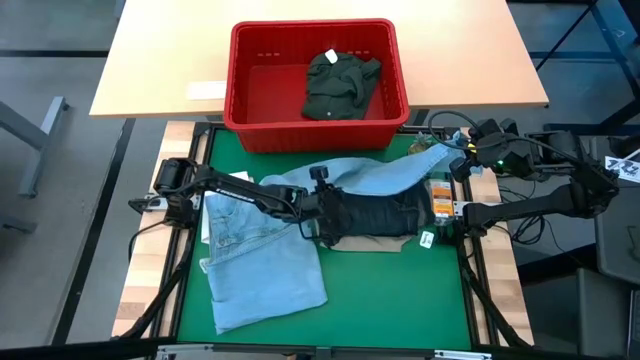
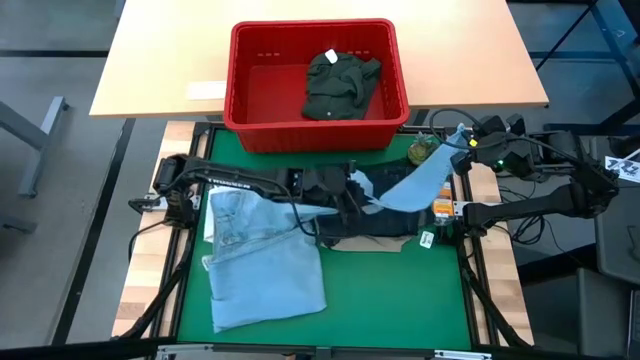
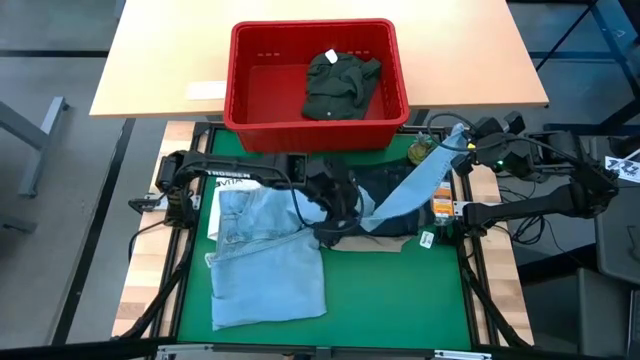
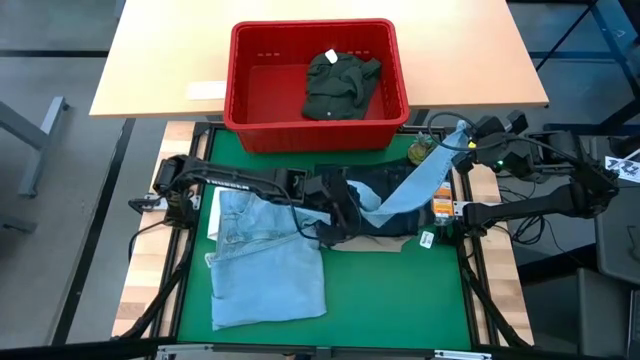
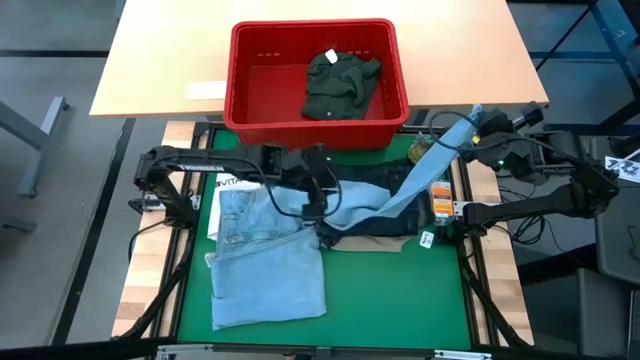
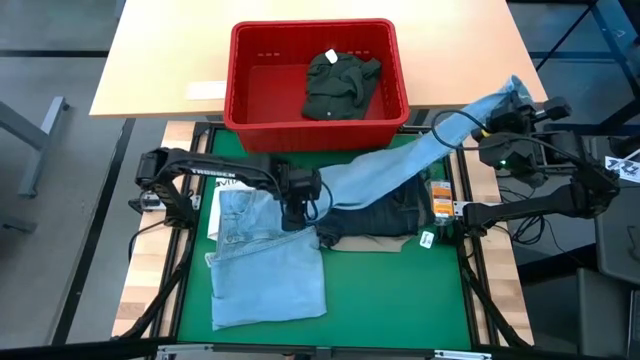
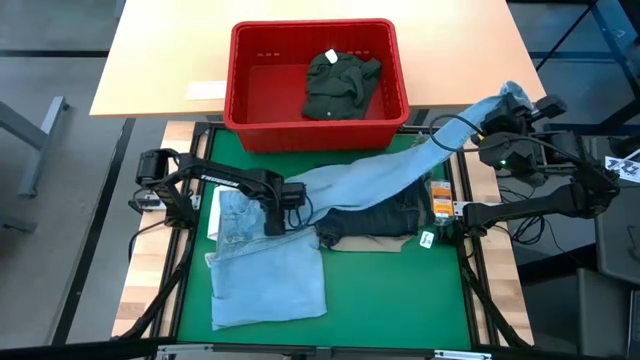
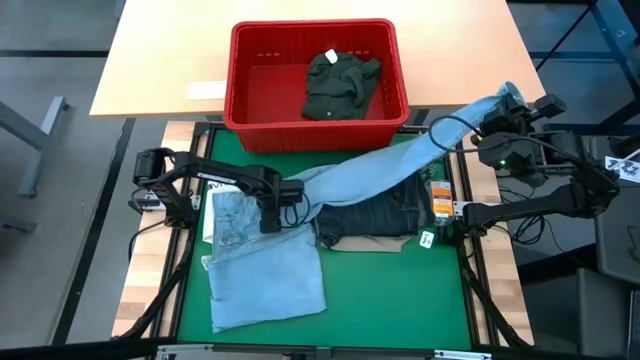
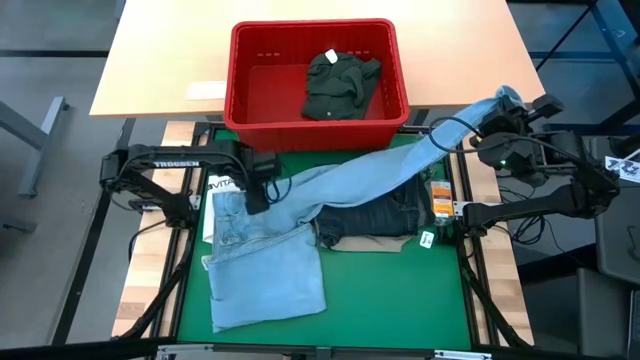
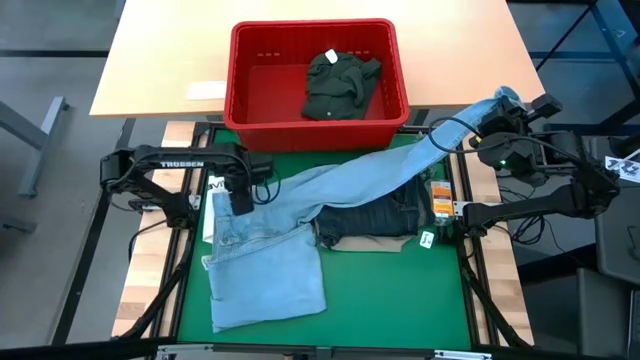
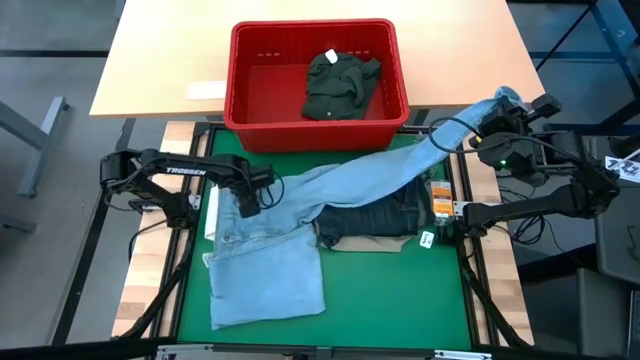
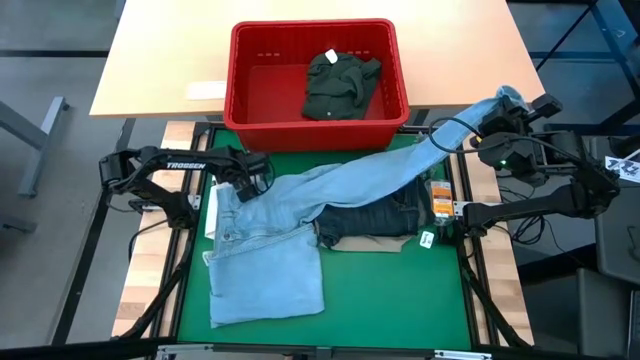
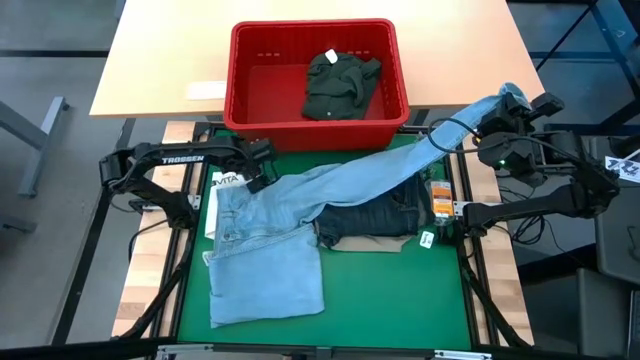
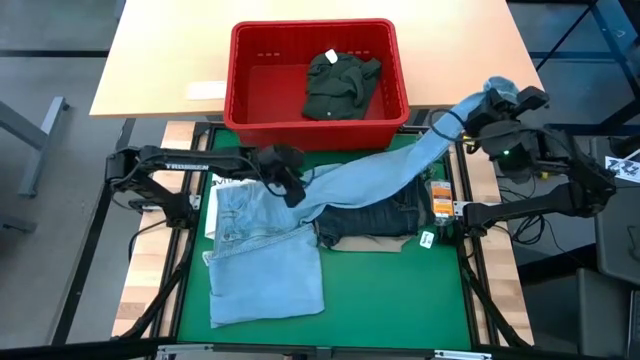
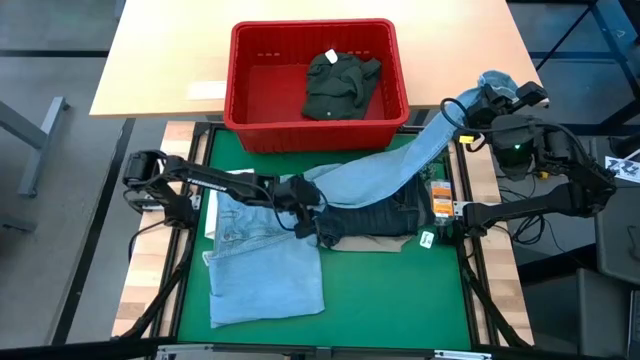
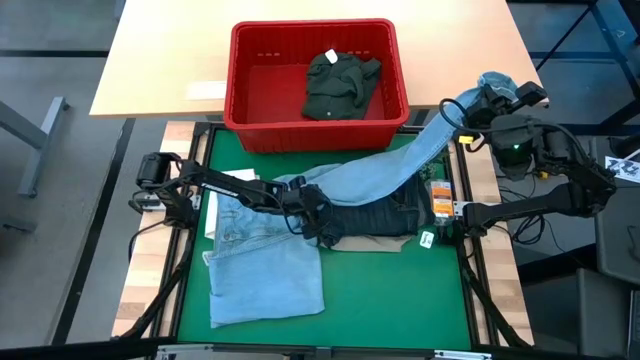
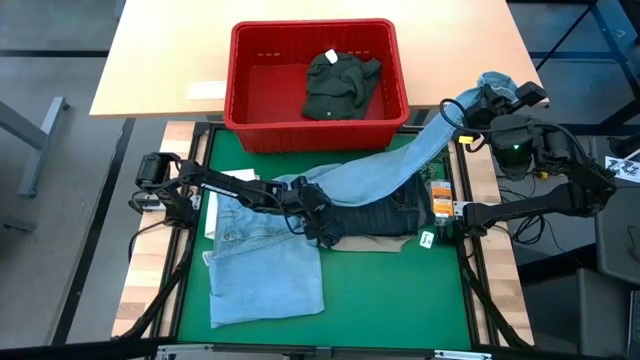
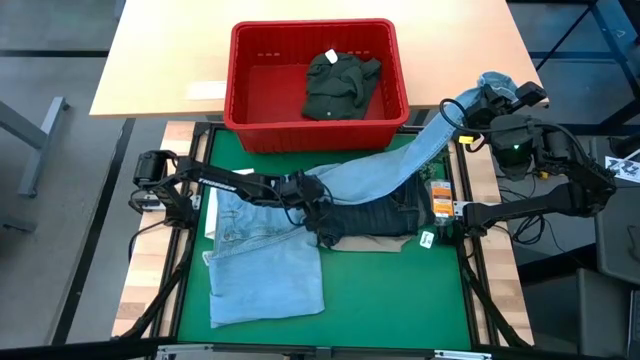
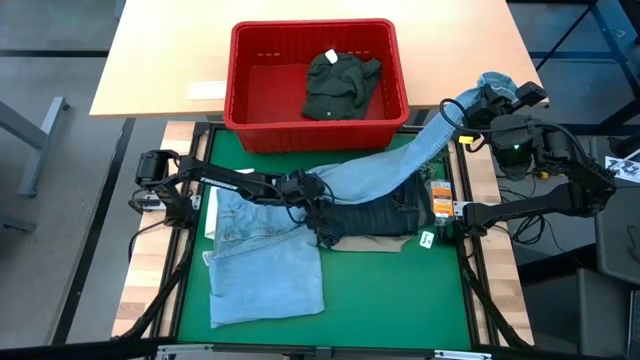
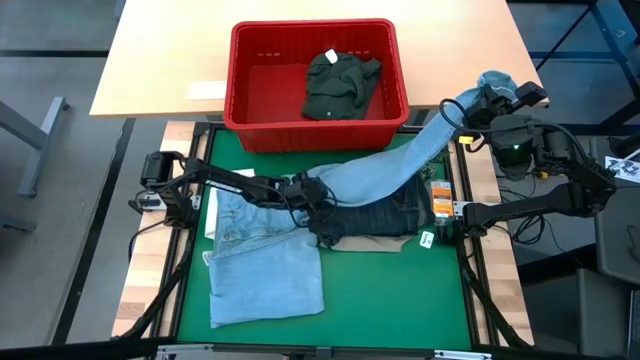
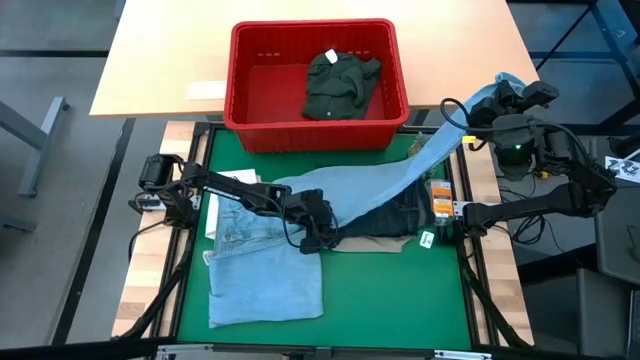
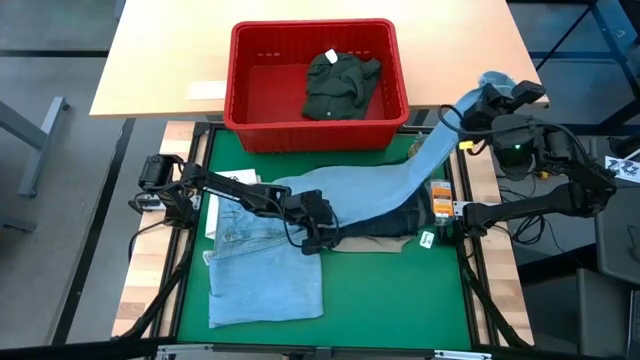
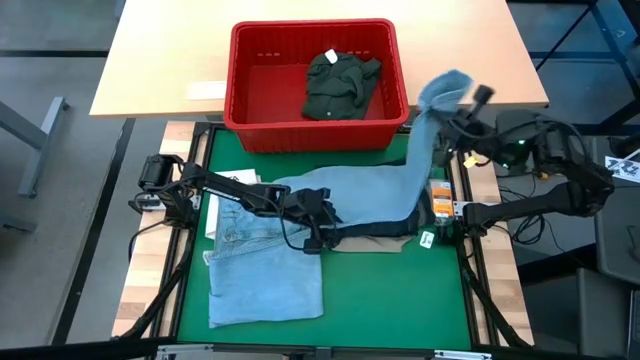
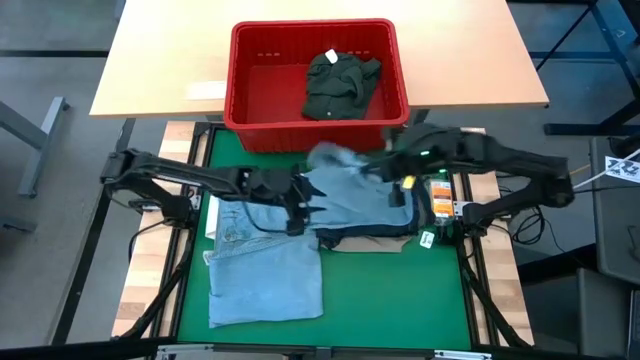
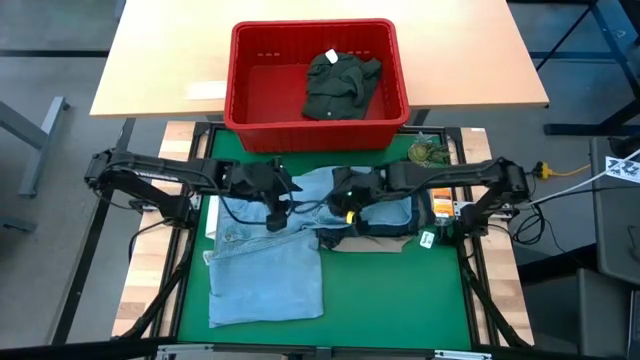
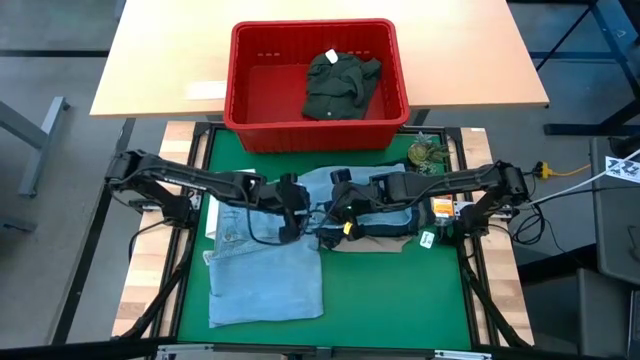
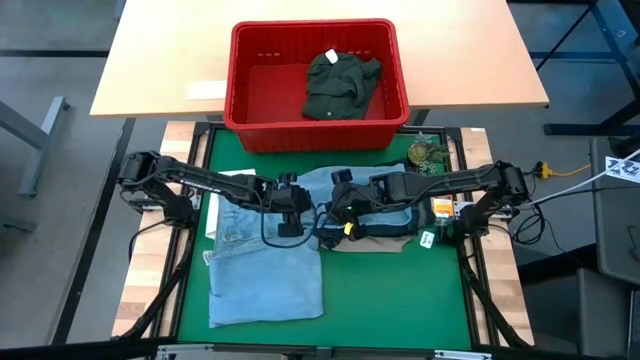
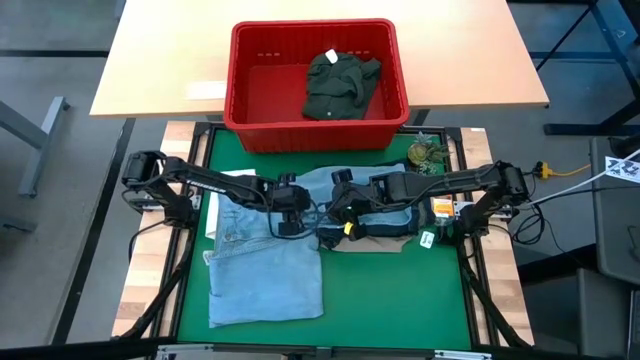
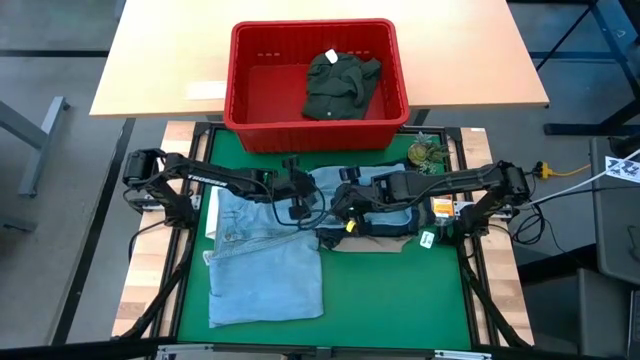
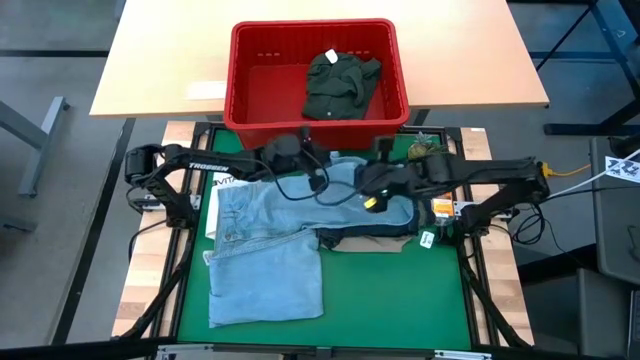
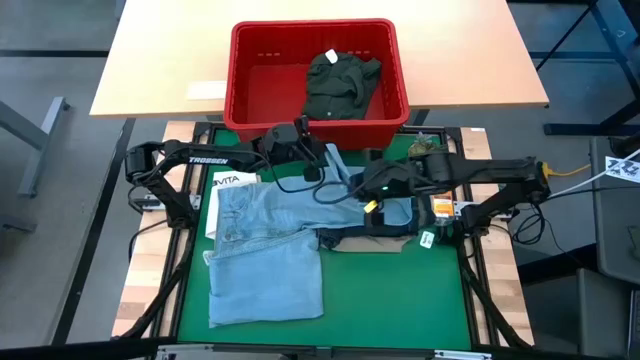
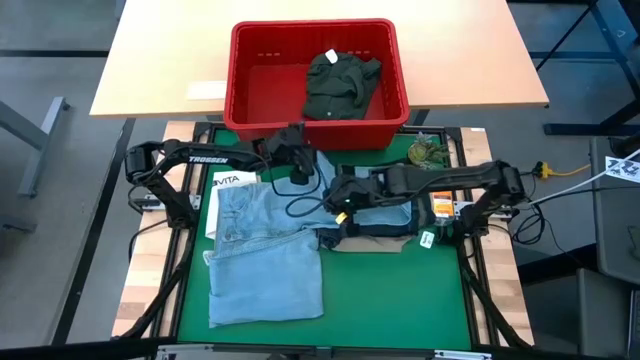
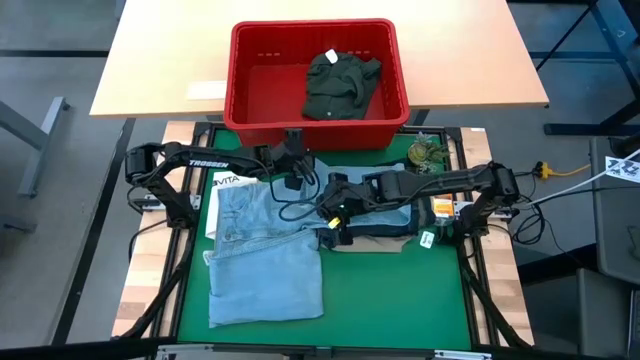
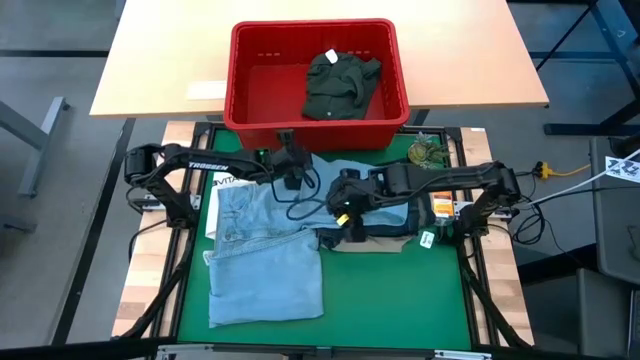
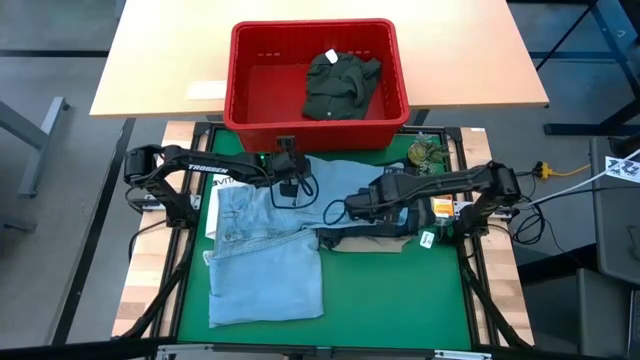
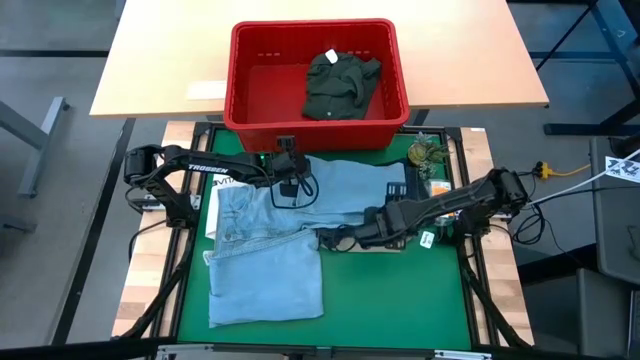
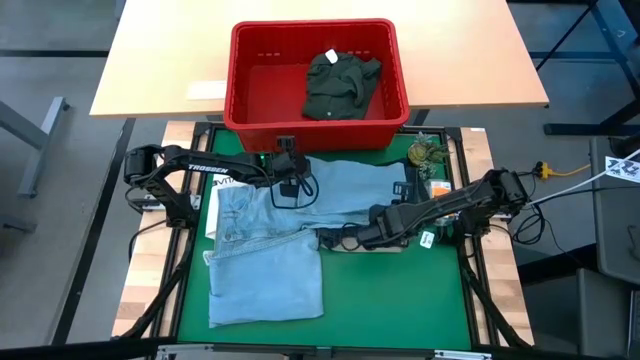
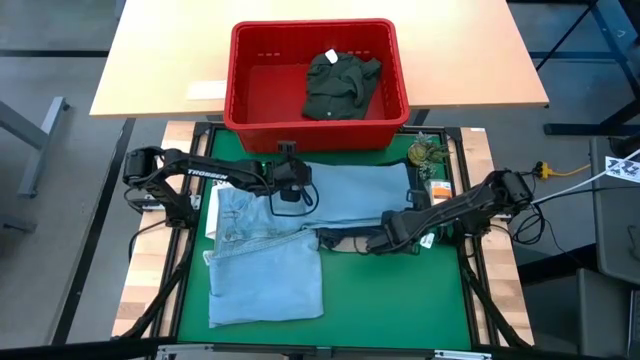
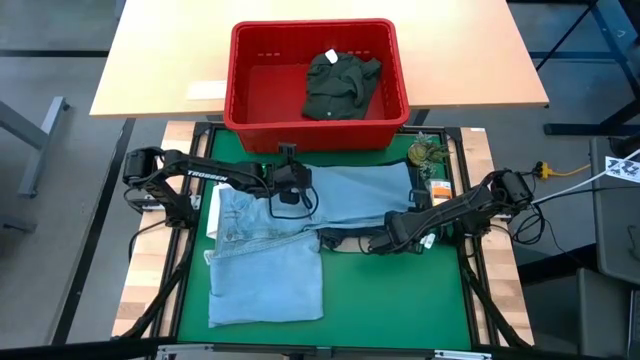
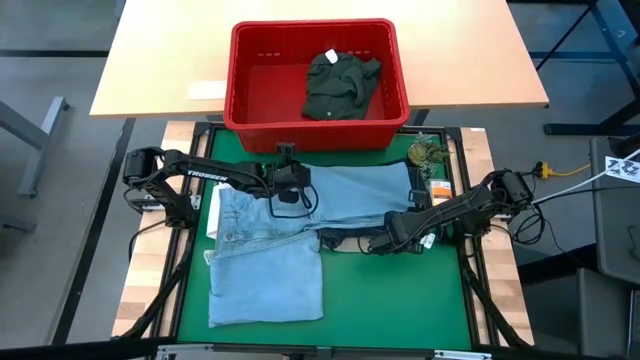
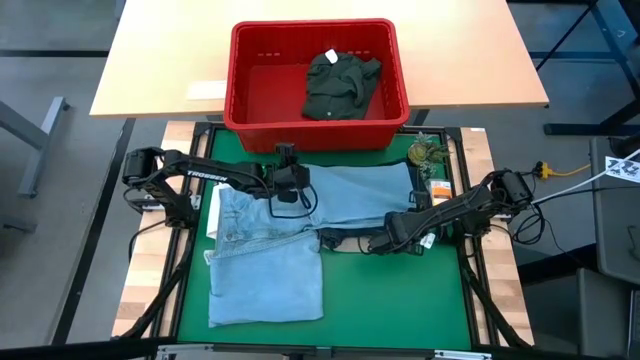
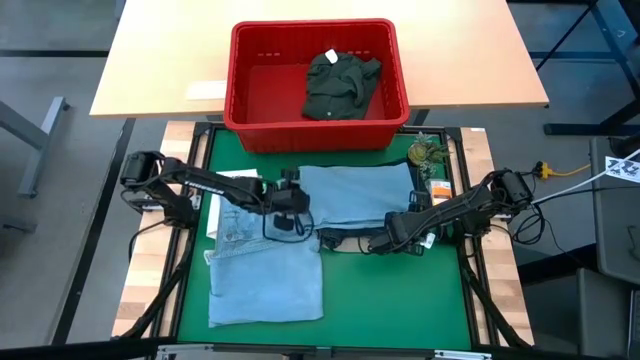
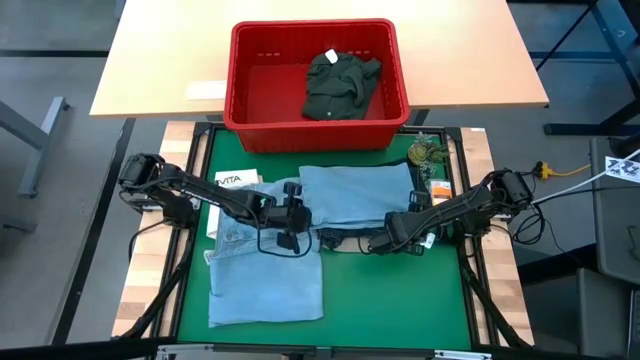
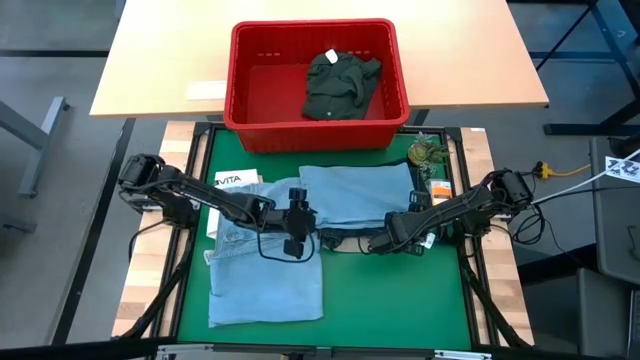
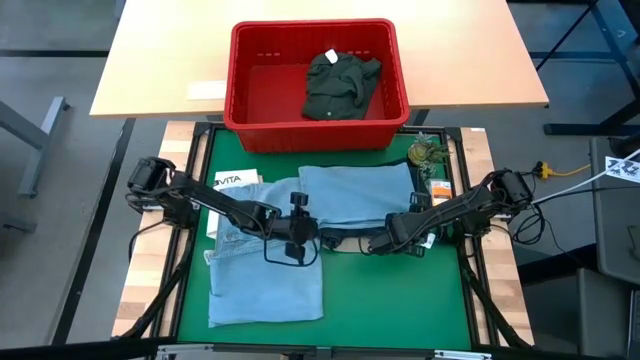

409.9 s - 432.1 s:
Task: Fold Laundry from Bin
Fold the light blue jeans
